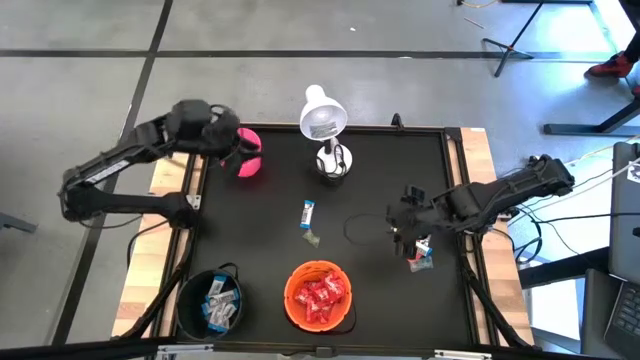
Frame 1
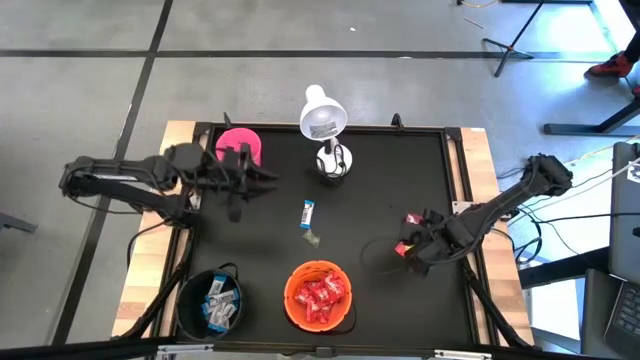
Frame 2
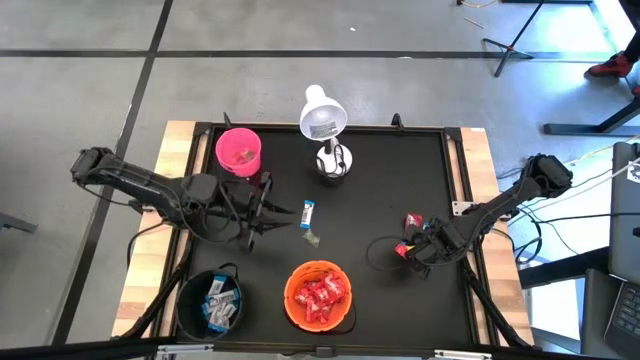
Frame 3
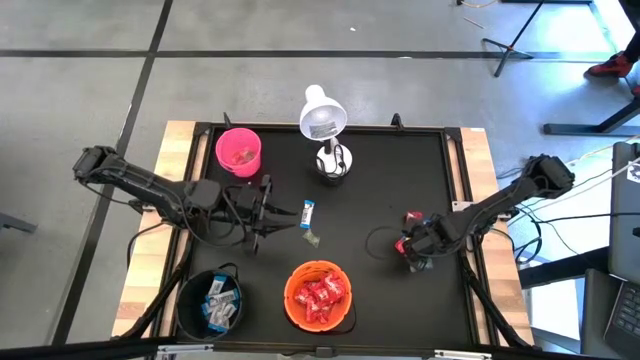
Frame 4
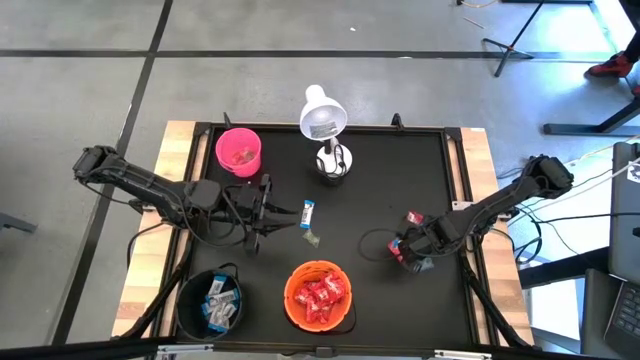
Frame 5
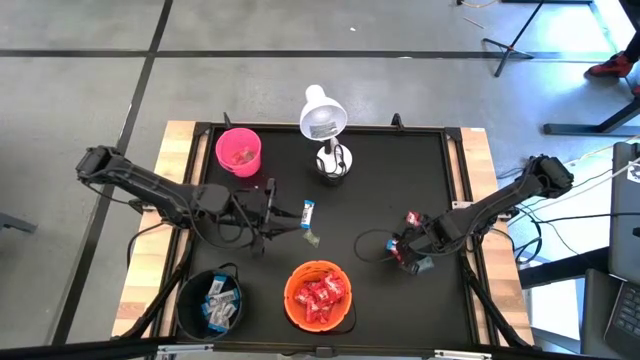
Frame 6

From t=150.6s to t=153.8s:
Task: Sort candy
Put the white candy into the black bucket

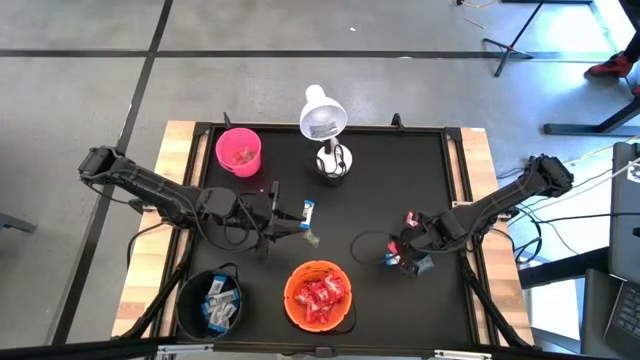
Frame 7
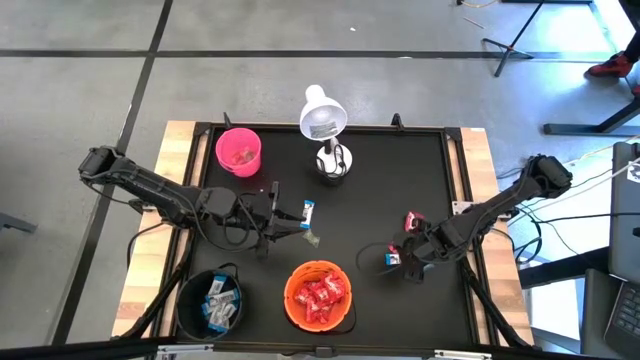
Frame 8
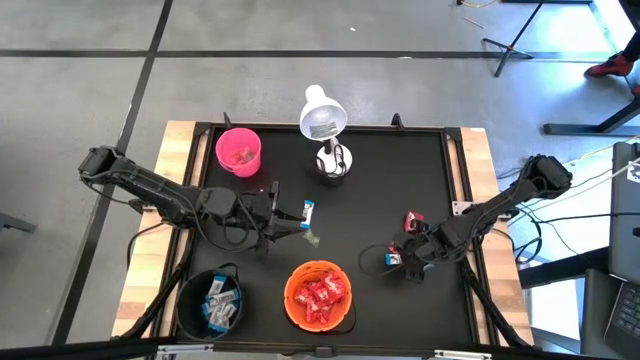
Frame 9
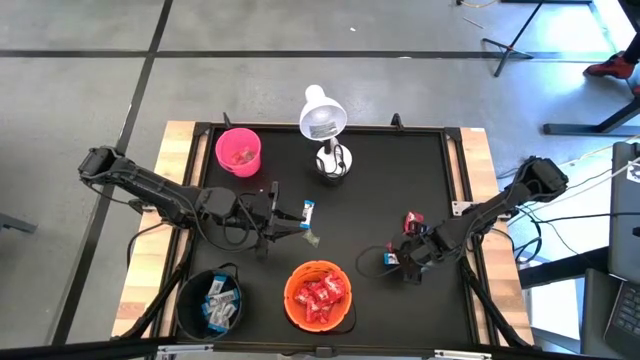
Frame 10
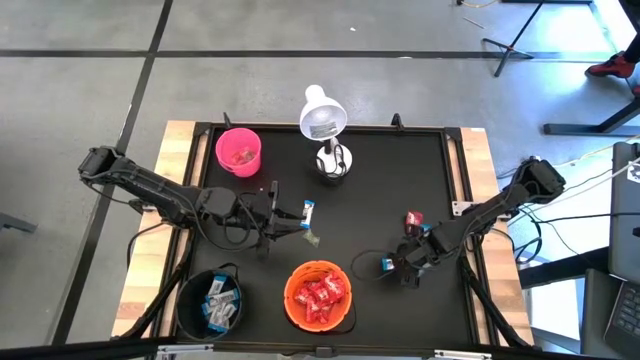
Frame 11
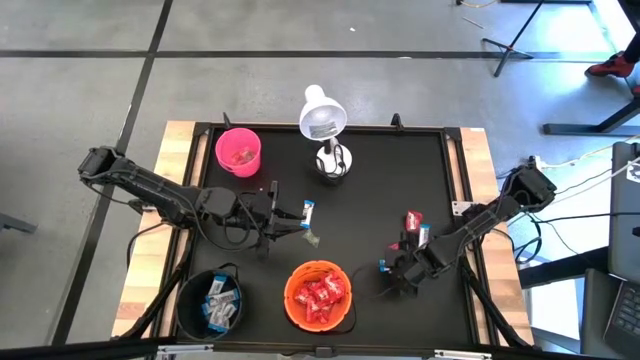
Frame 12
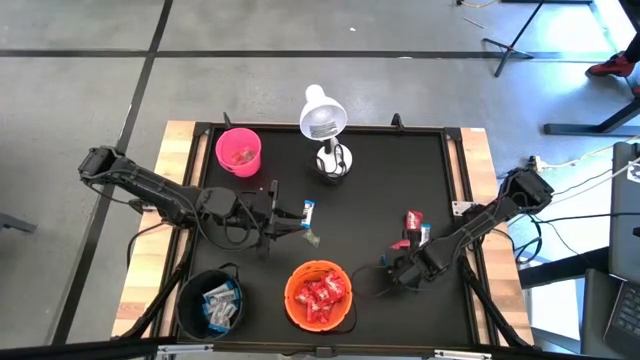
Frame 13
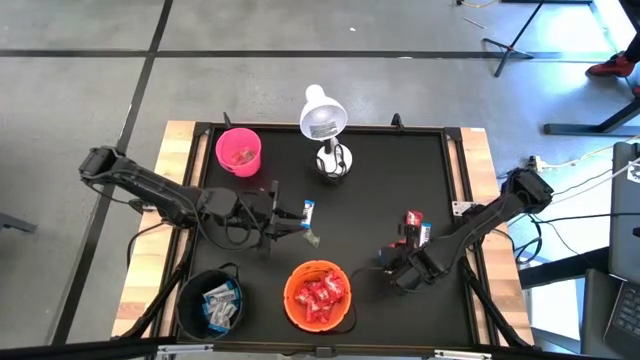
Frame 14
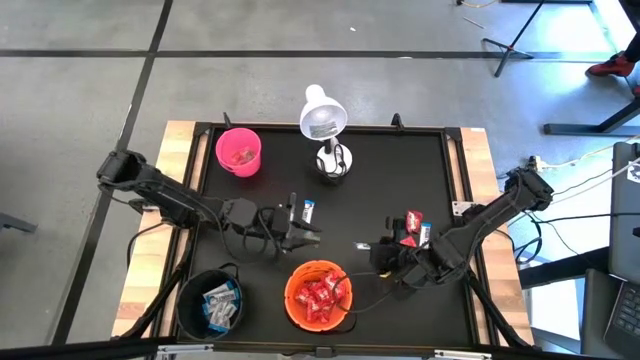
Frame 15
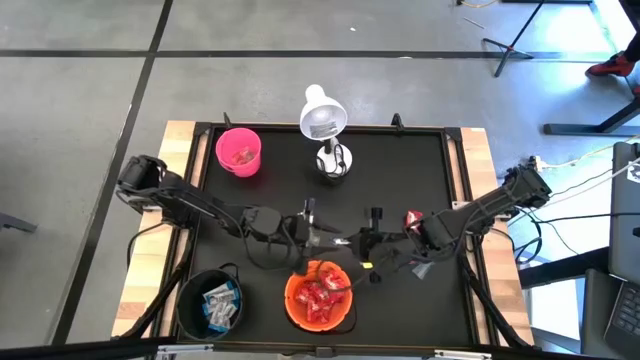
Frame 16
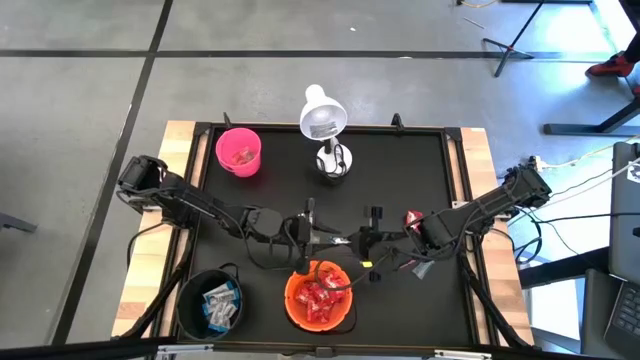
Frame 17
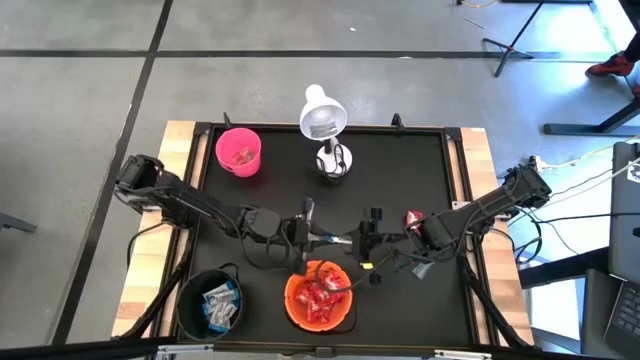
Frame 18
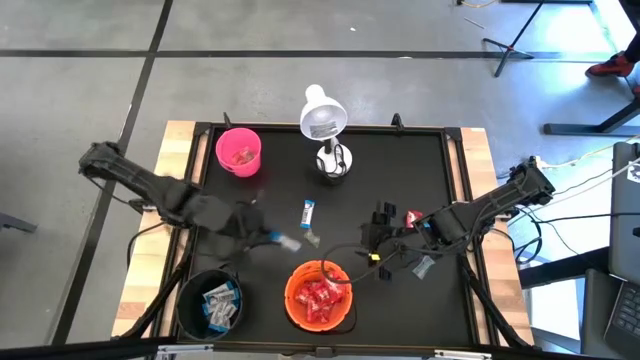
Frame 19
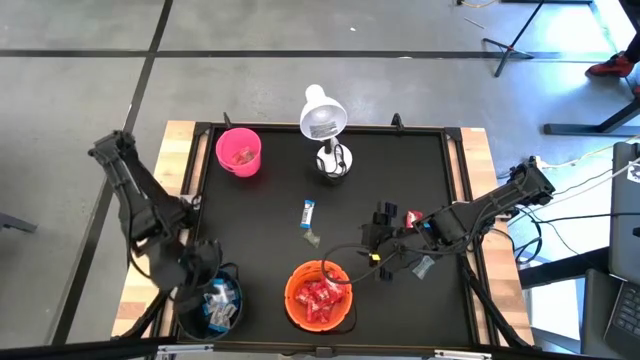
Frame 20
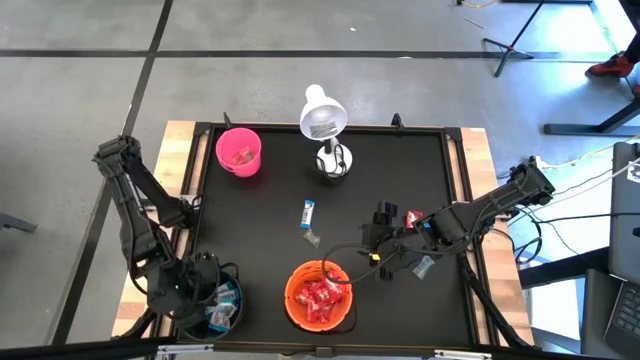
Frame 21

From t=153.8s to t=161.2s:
Put the white candy into the black bucket

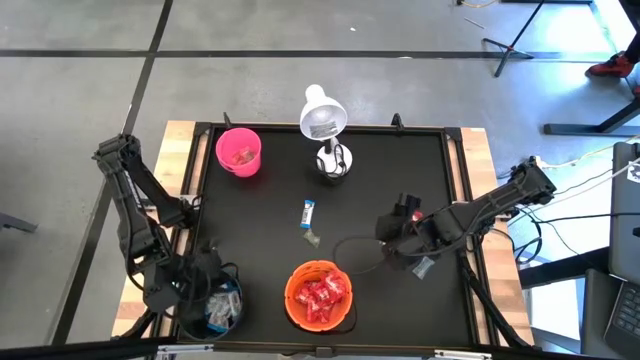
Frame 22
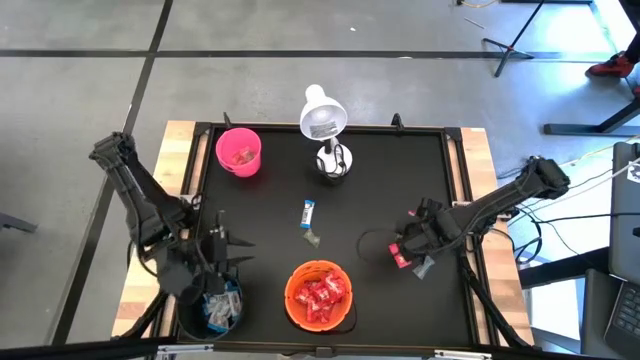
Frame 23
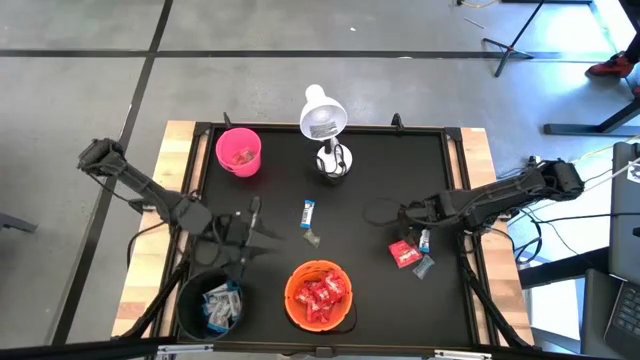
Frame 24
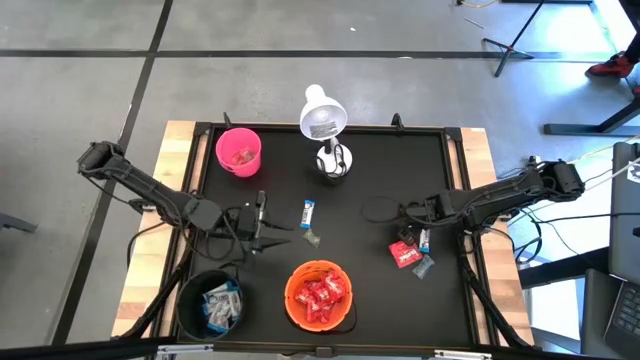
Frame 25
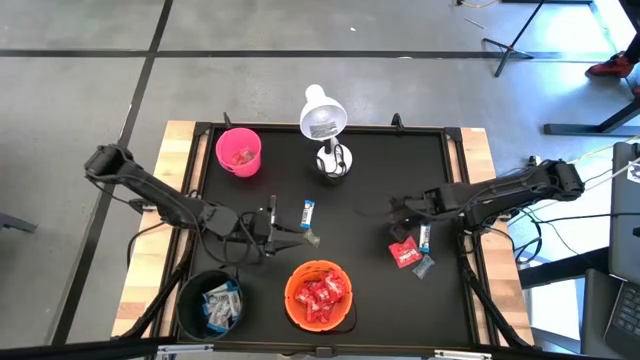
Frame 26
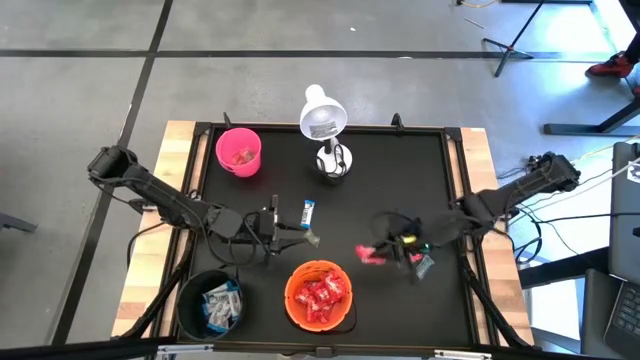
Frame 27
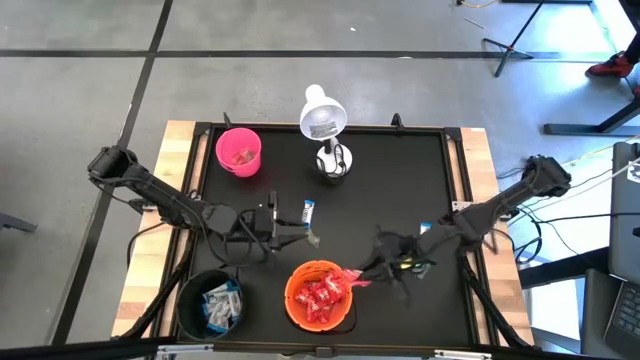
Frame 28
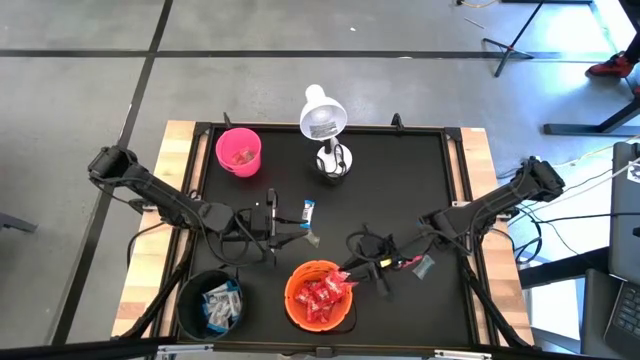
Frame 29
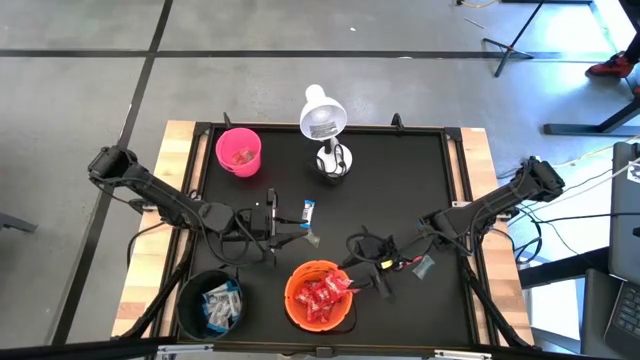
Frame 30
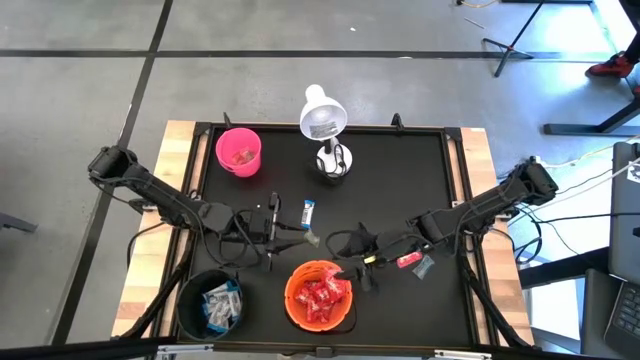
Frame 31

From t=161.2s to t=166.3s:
Put the red candy into the orange bucket

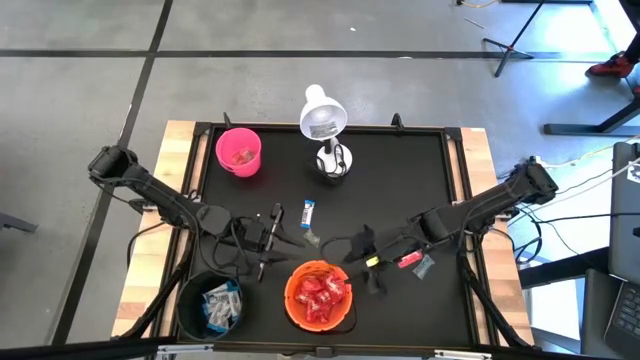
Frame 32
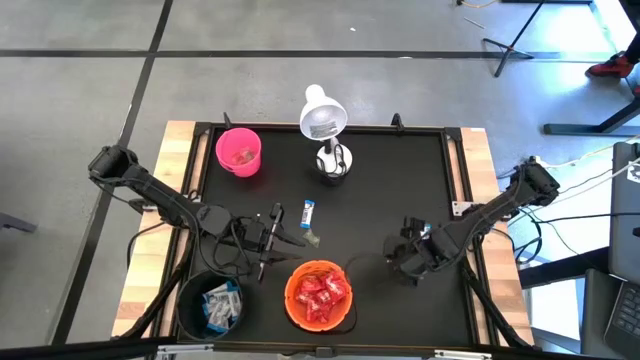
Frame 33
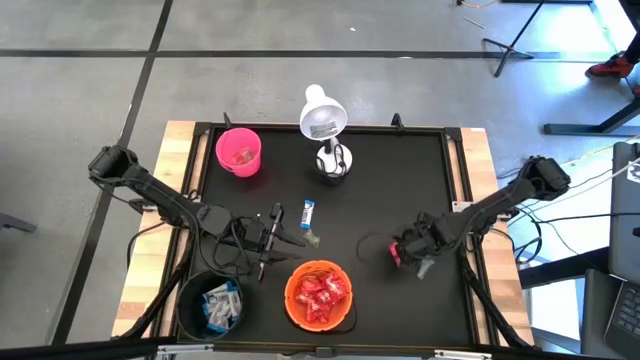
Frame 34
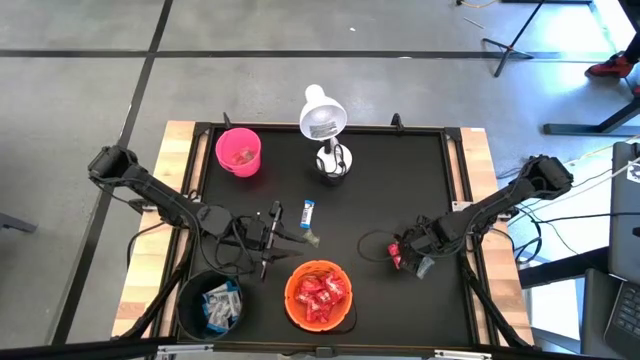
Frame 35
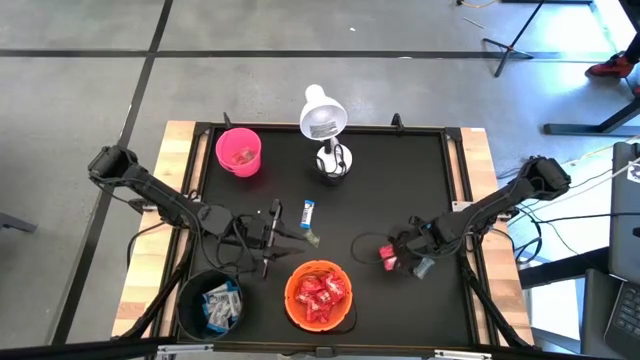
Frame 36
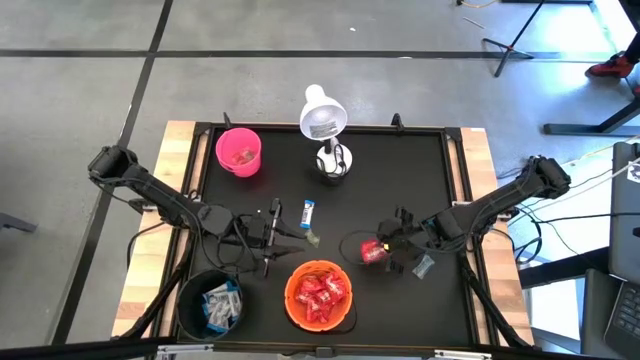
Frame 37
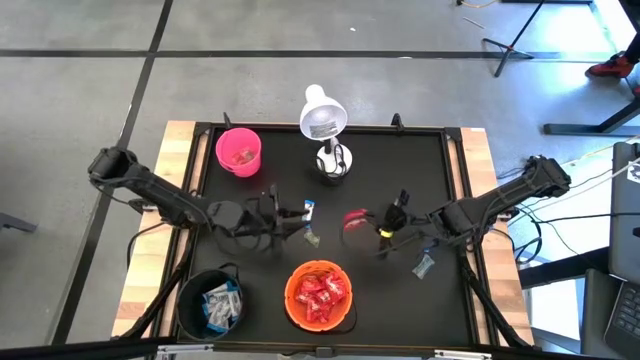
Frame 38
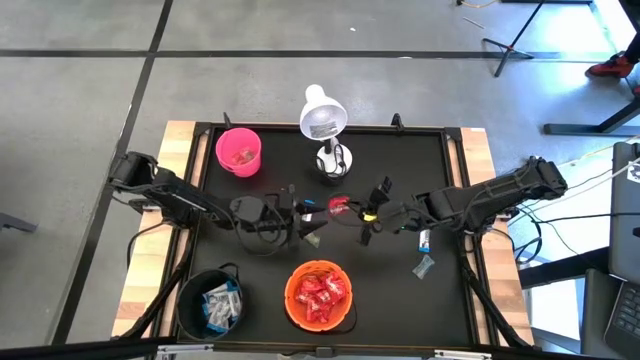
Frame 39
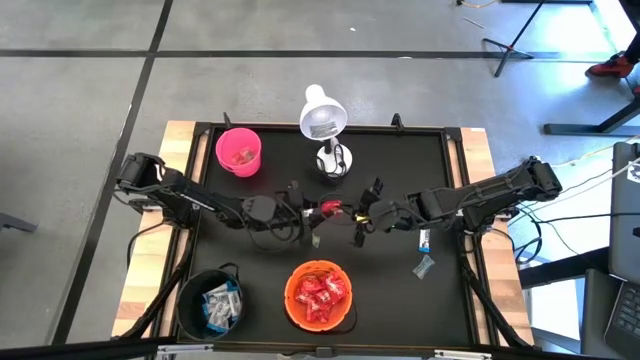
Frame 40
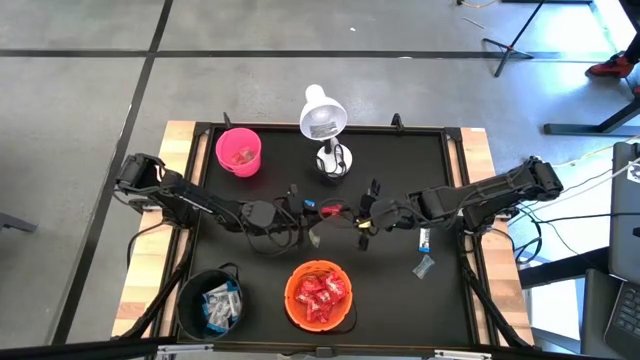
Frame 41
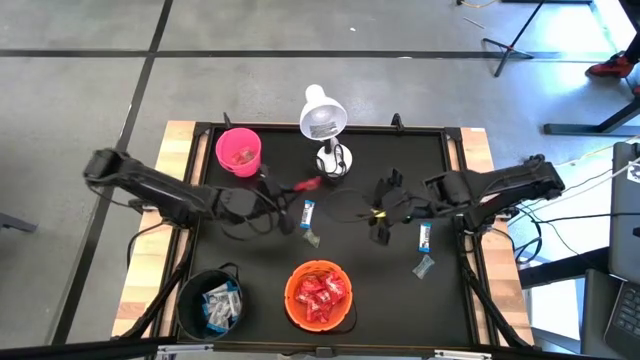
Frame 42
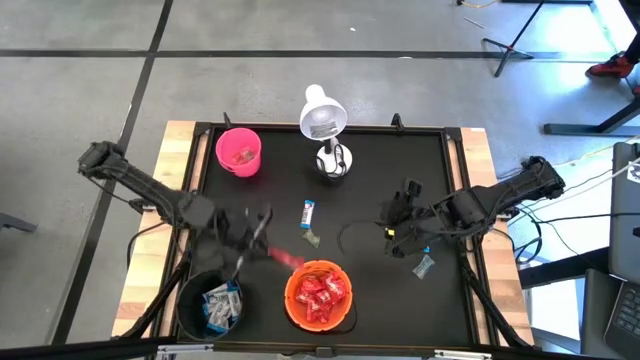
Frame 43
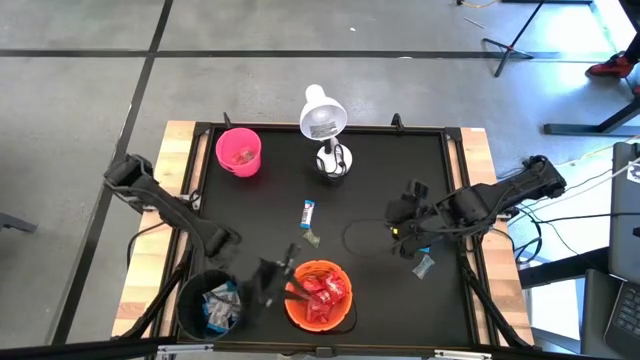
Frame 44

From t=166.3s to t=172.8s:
Put the red candy into the orange bucket
